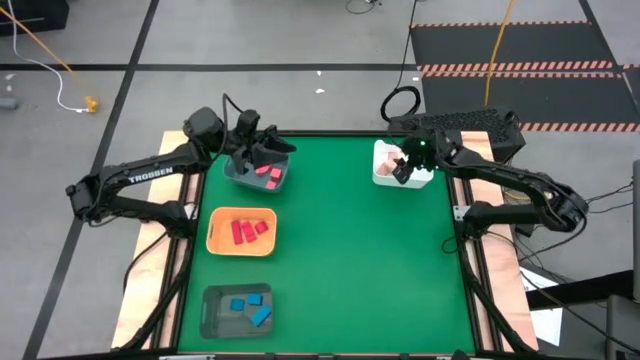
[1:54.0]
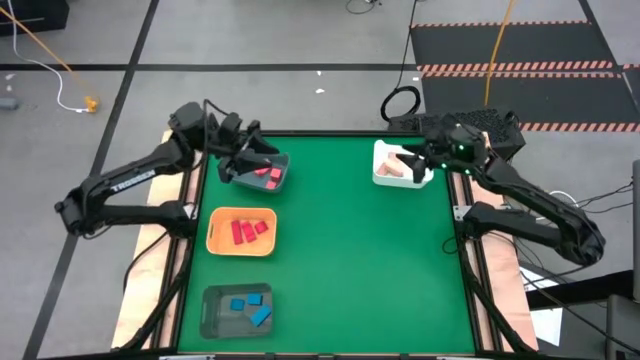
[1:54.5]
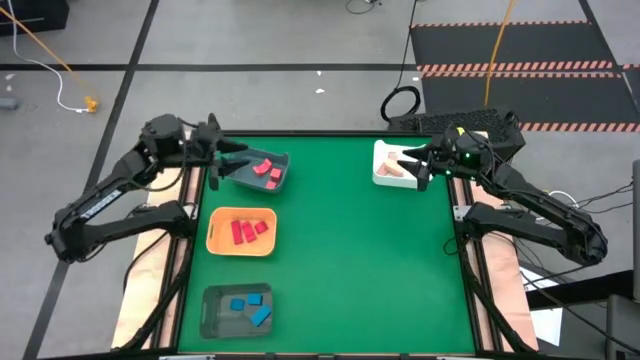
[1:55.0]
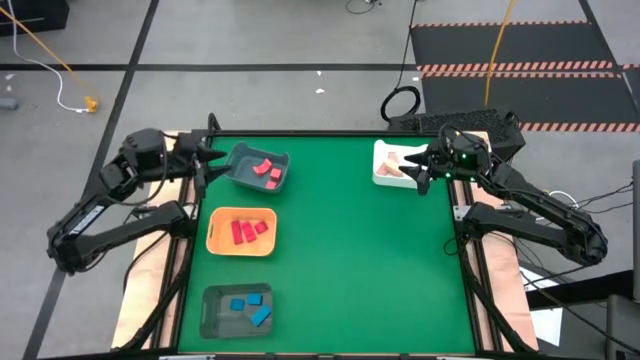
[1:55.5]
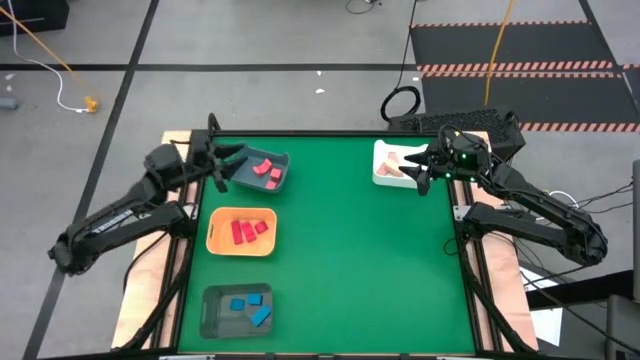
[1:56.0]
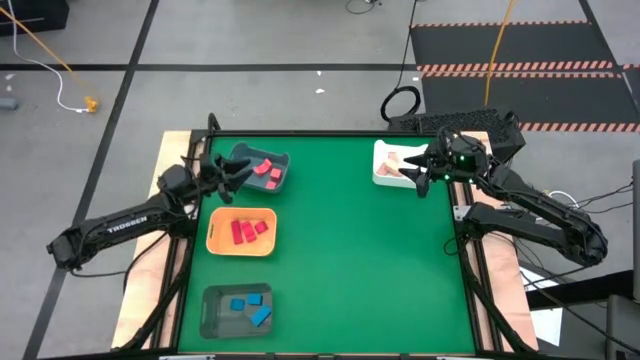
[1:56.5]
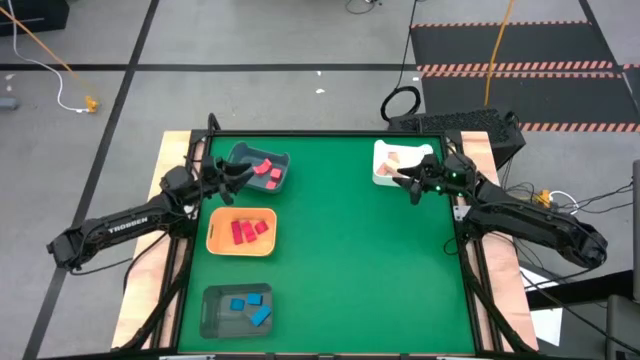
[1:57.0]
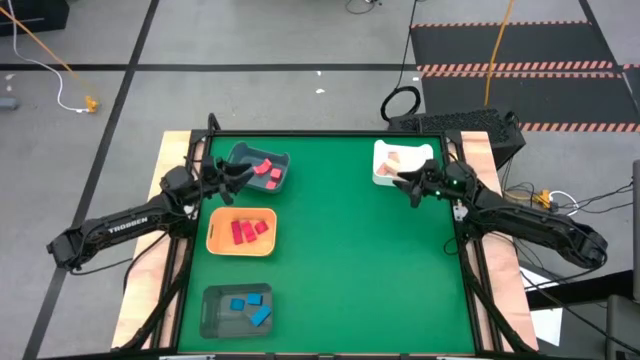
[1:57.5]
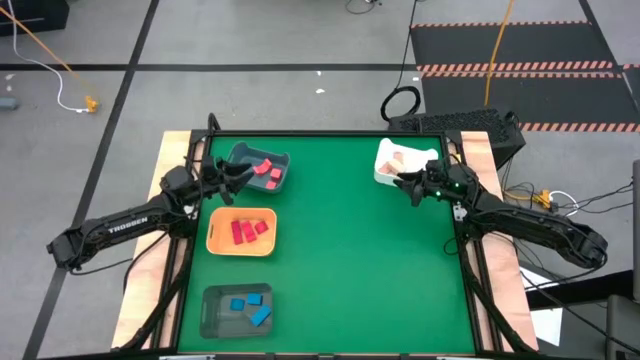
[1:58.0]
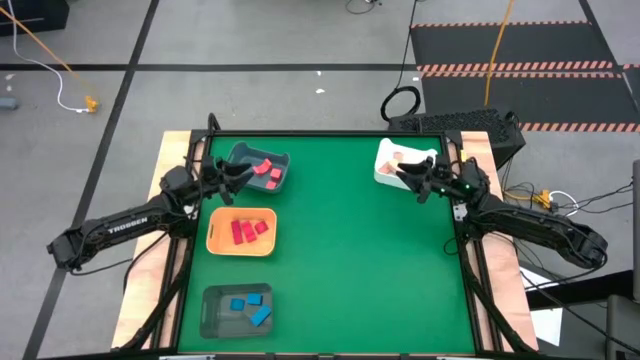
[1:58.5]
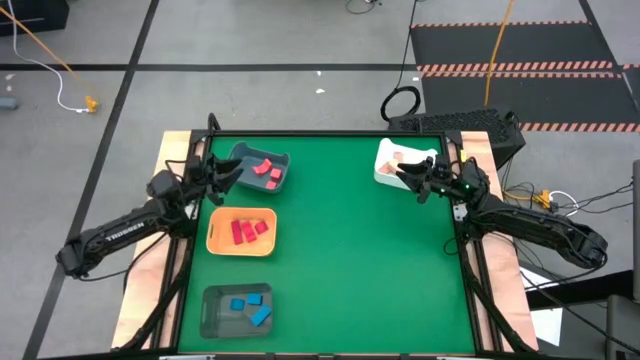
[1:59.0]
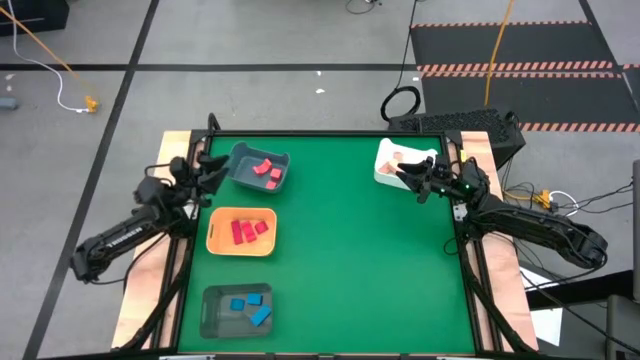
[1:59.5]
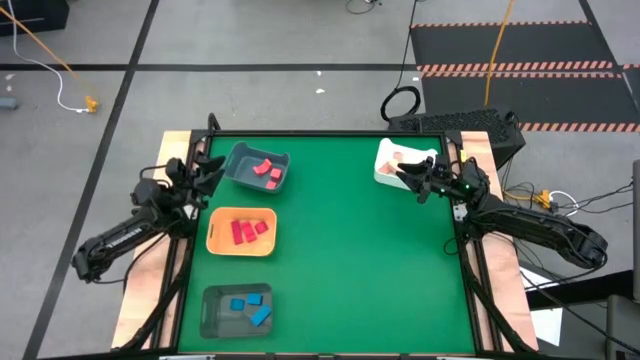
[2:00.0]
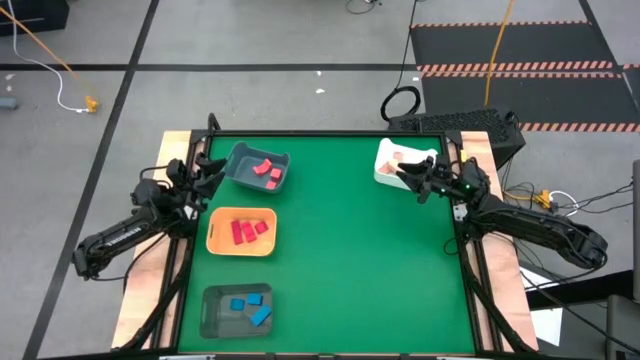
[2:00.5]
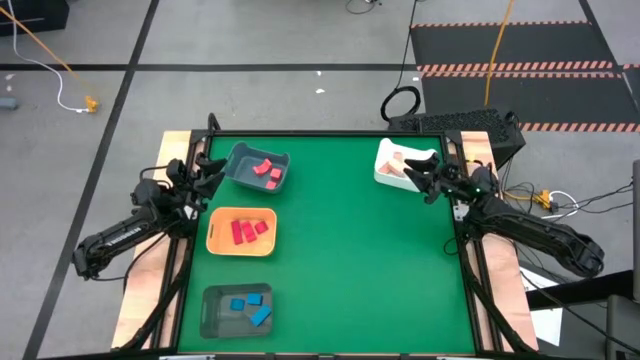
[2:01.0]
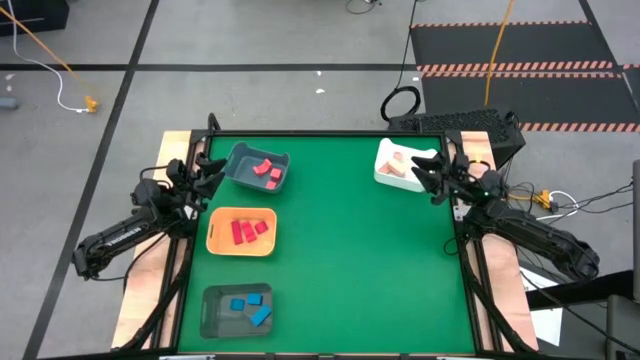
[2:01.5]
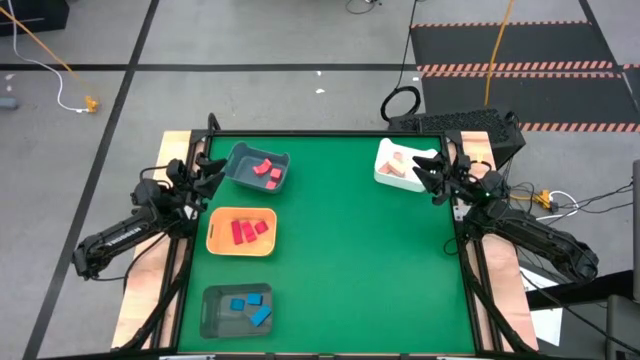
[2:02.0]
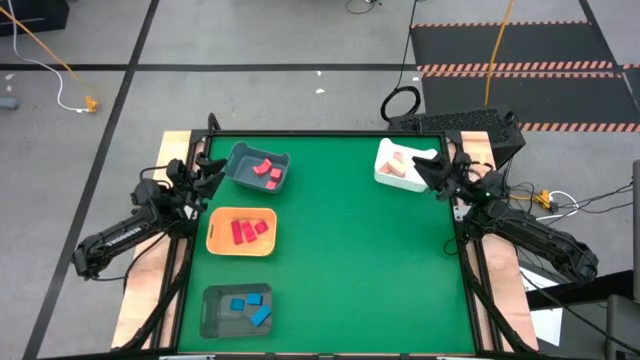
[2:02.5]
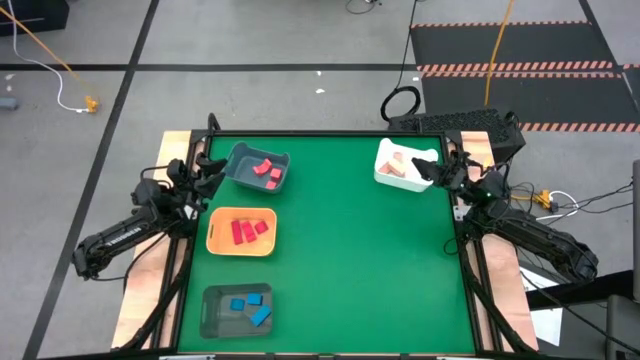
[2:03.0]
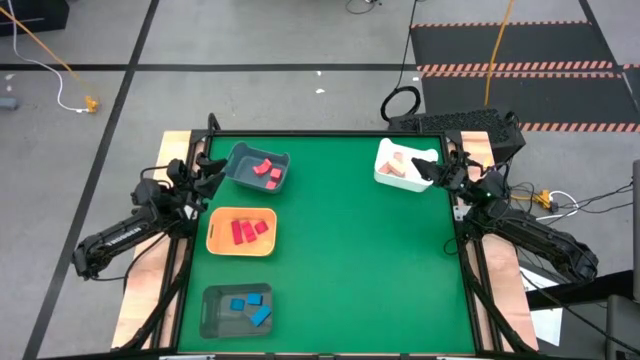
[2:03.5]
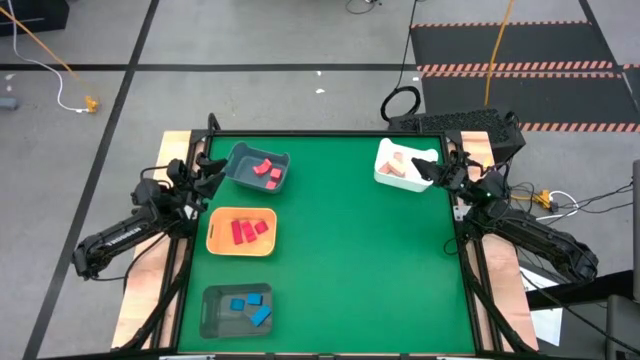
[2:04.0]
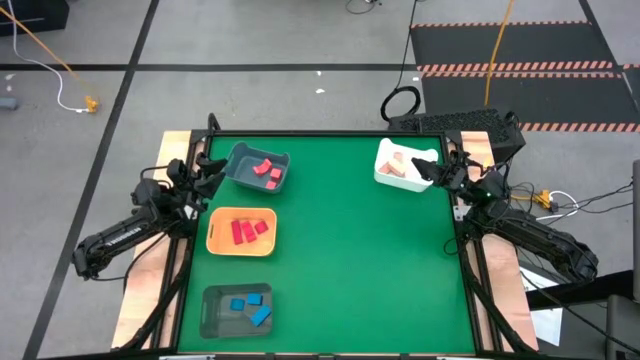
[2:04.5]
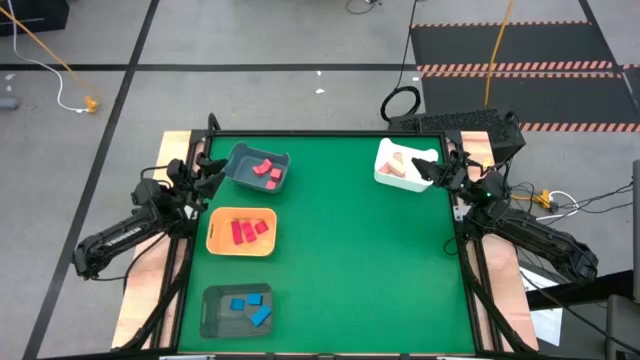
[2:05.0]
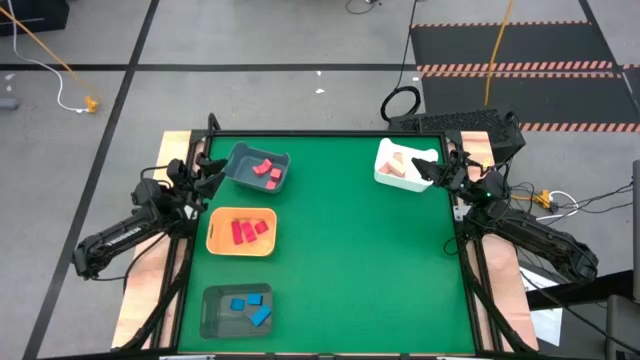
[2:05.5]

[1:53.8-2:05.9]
Task: Sort & place blocks by color
Return to Home Position

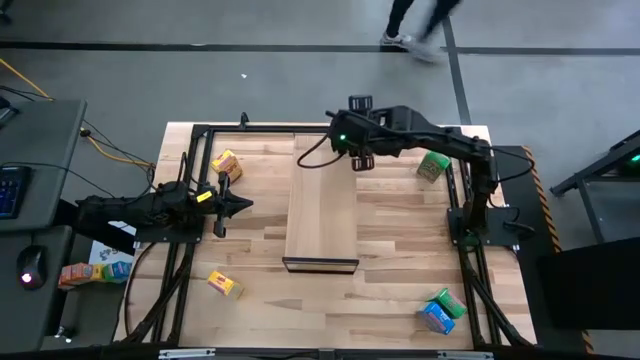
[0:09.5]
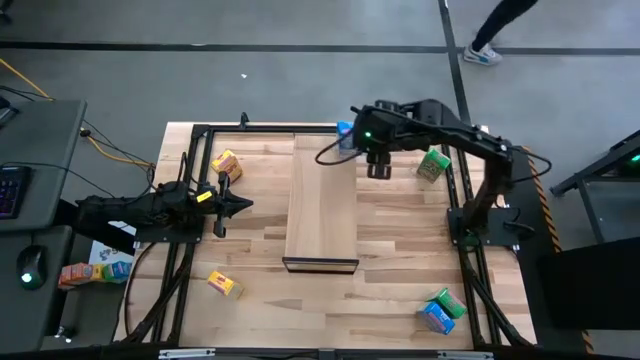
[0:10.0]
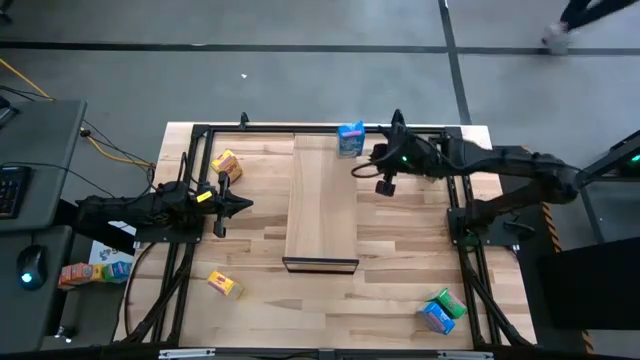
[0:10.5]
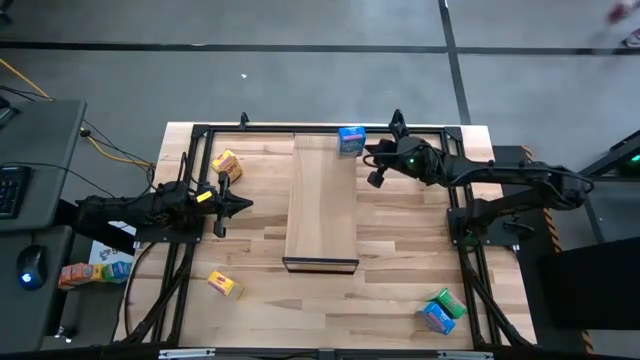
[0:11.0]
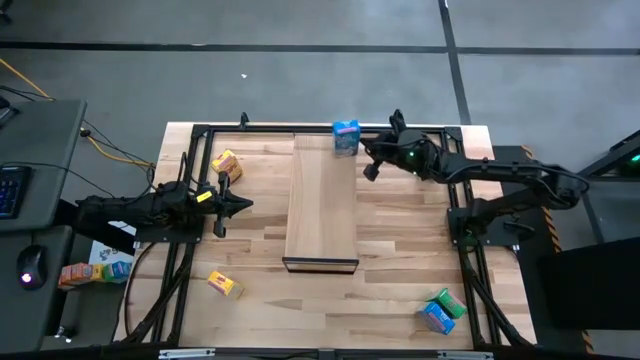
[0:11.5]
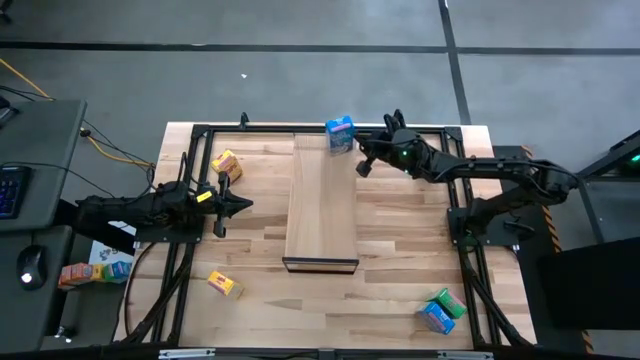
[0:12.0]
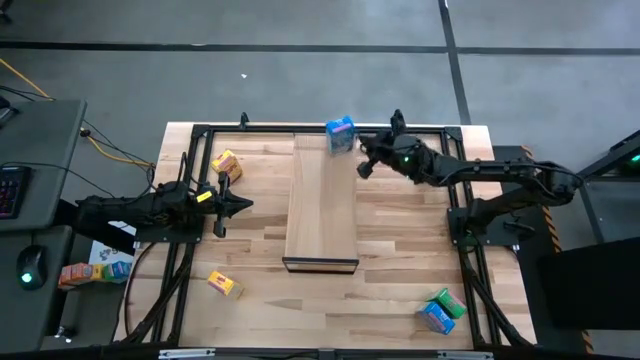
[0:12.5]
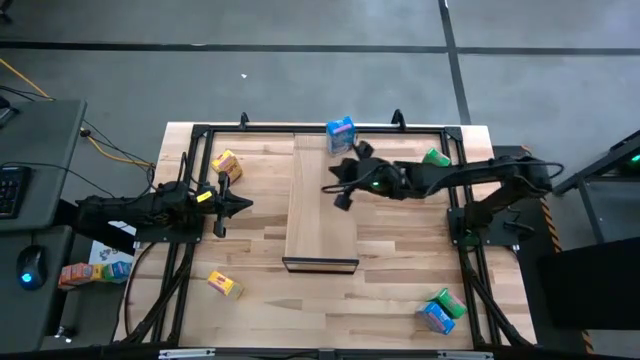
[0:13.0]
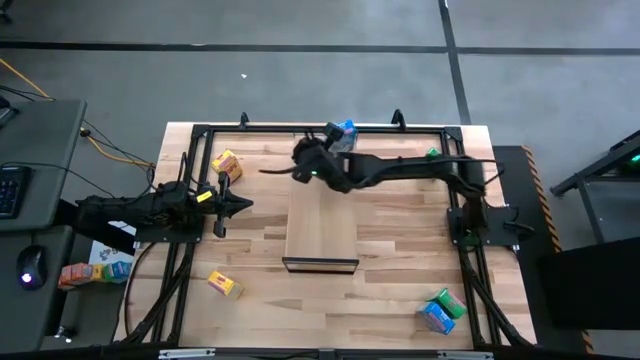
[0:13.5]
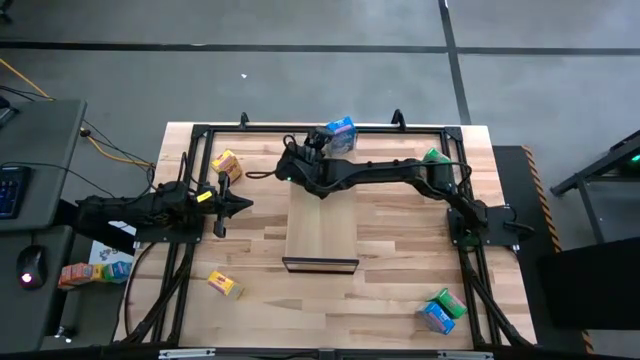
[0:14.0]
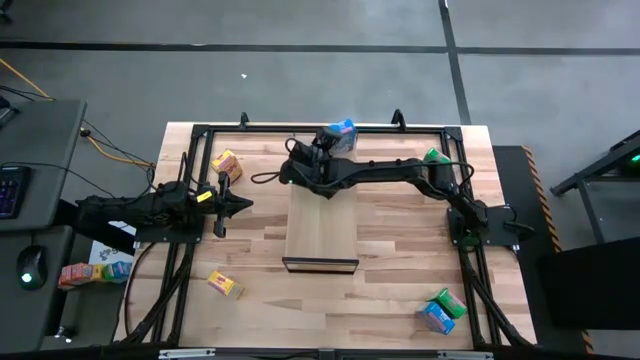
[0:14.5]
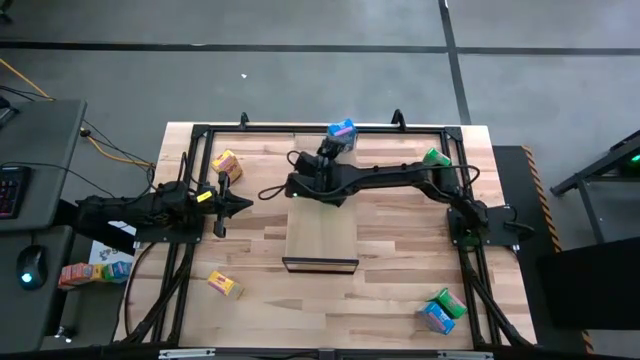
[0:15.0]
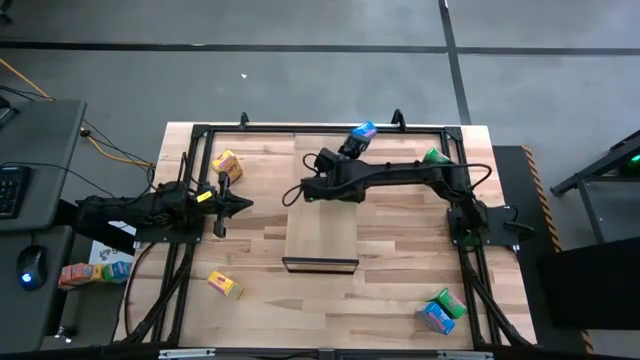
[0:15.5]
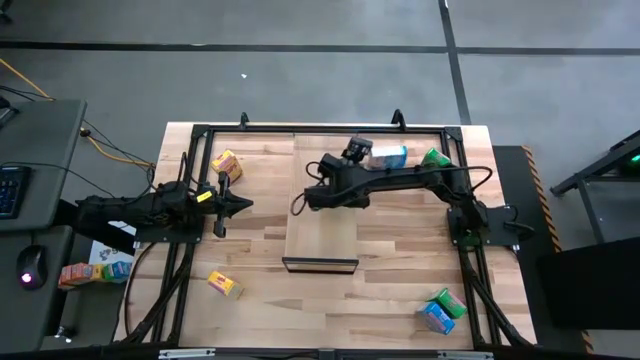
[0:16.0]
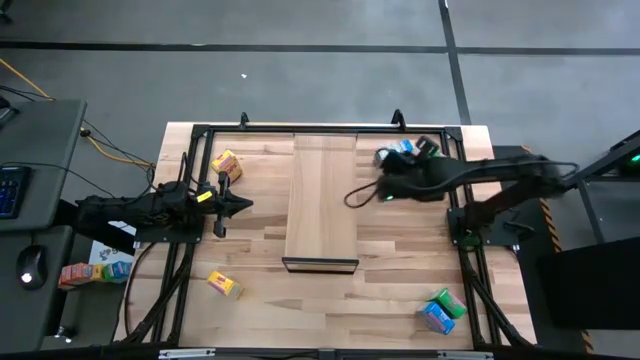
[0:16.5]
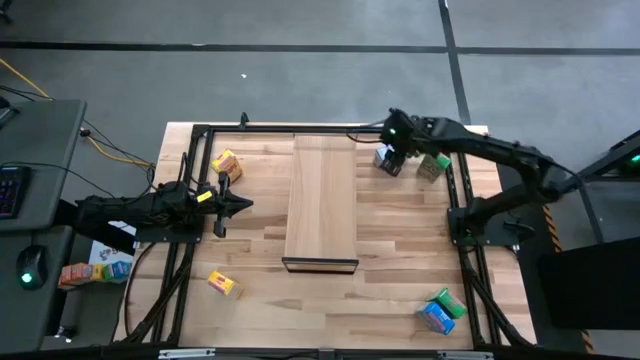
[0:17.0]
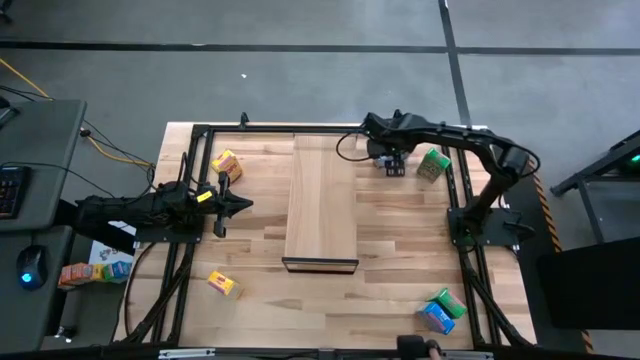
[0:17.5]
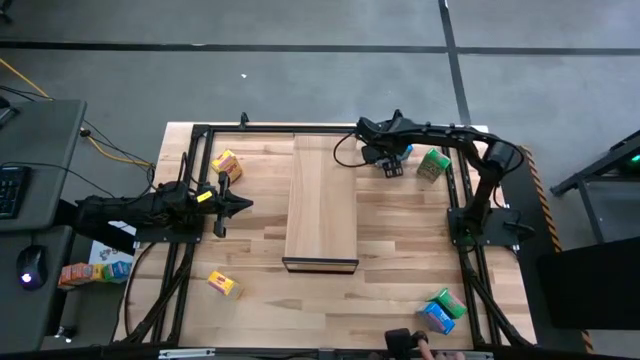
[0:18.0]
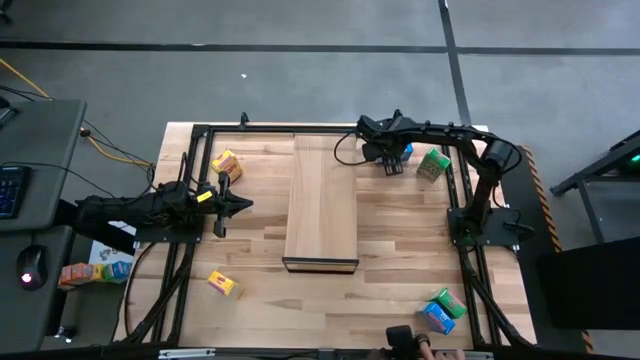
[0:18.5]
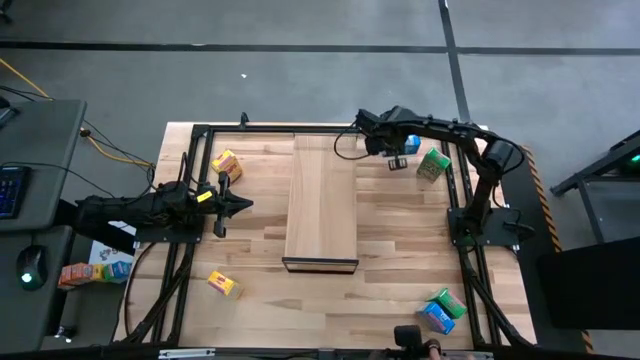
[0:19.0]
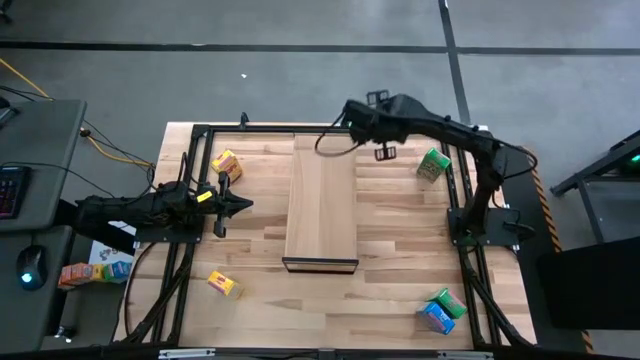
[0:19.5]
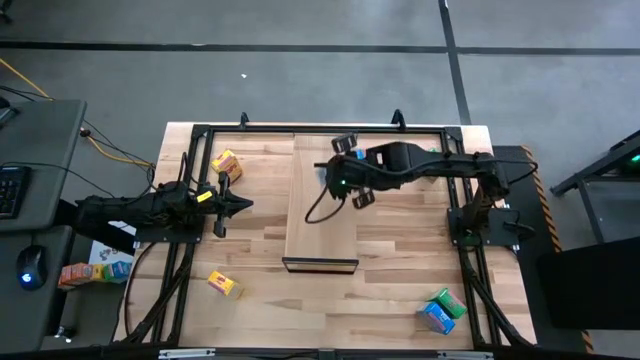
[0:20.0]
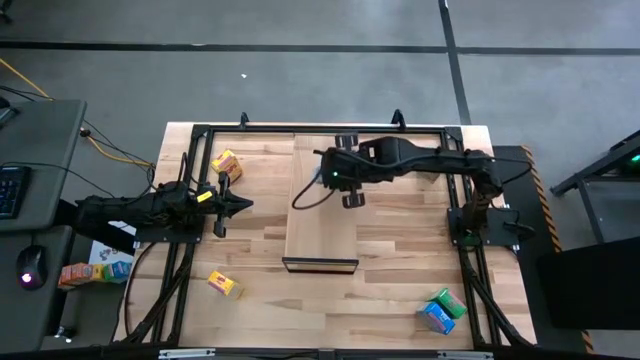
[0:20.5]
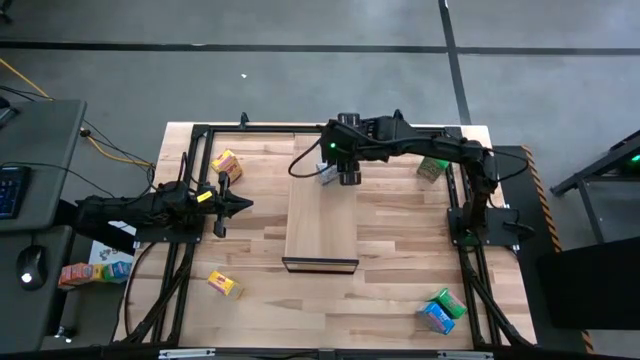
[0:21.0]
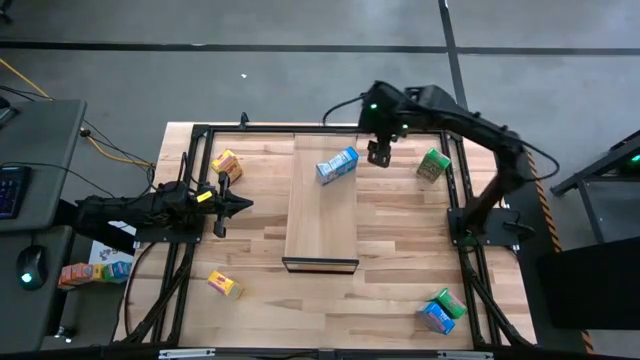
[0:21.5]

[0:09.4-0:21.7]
Task: Stack cereal on shelf
Adjust the blue cereal box on the shelf
